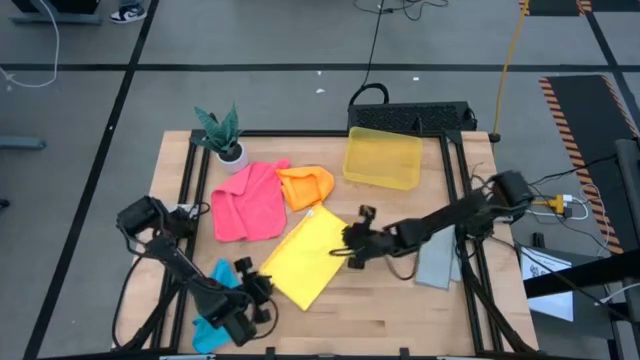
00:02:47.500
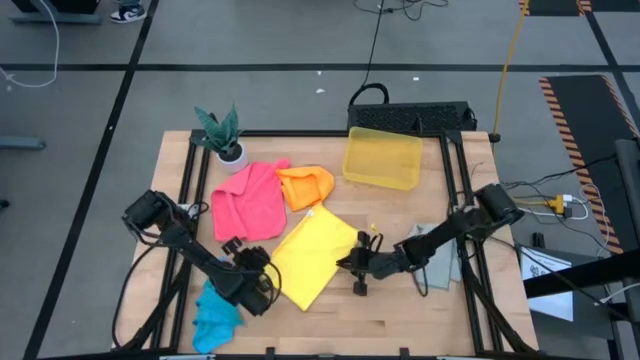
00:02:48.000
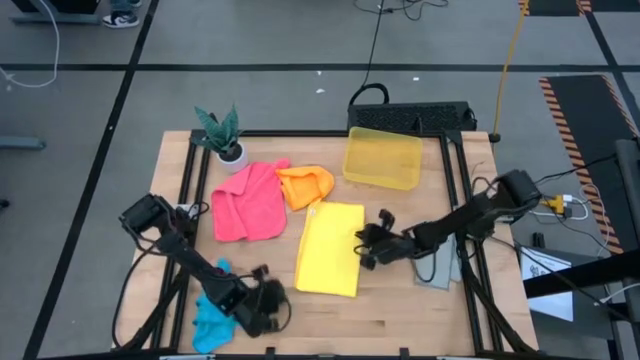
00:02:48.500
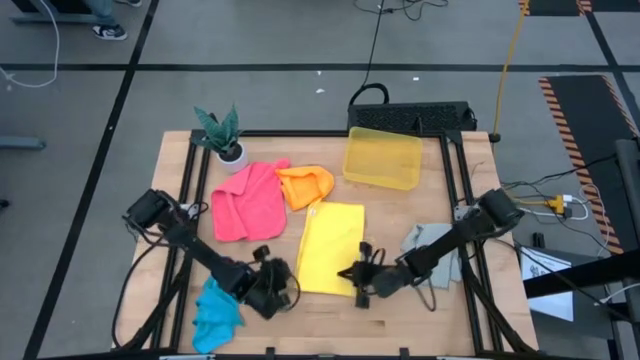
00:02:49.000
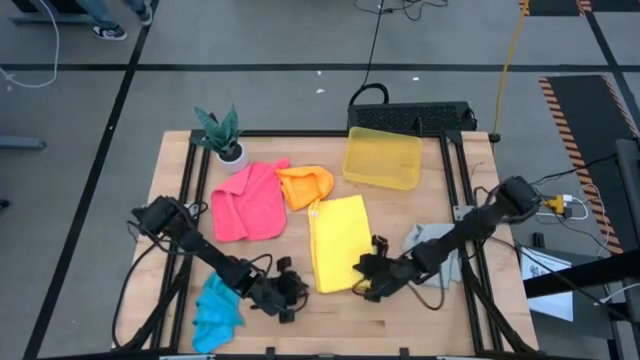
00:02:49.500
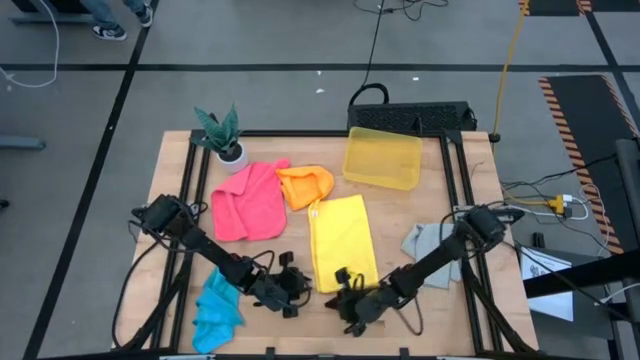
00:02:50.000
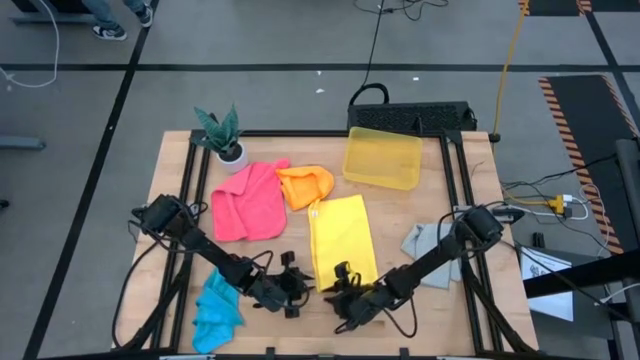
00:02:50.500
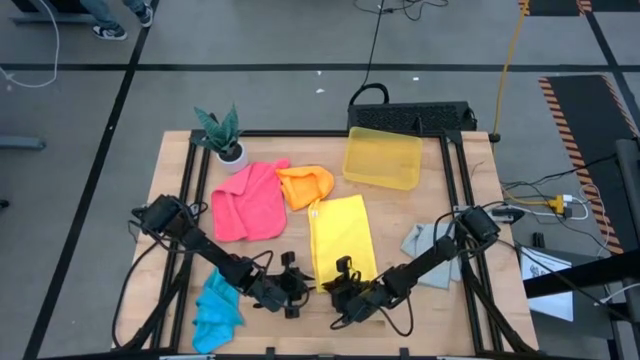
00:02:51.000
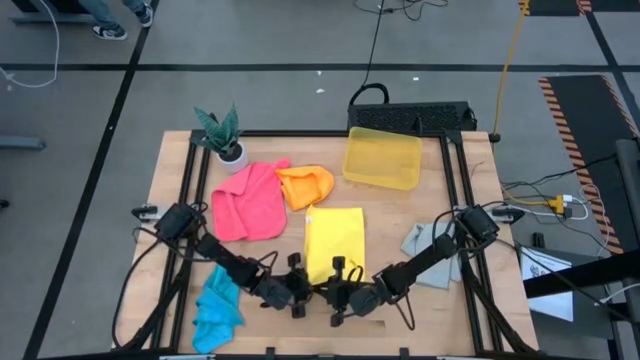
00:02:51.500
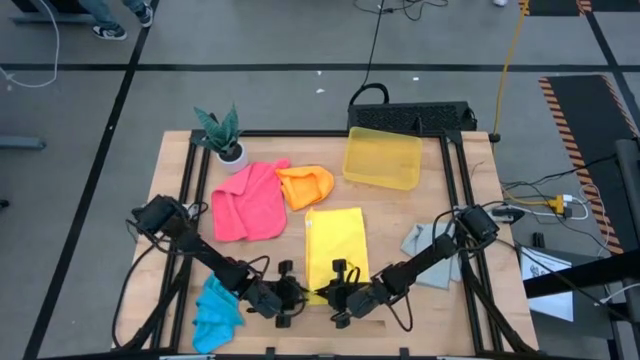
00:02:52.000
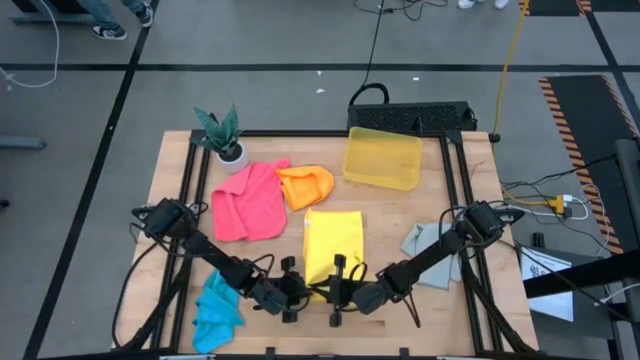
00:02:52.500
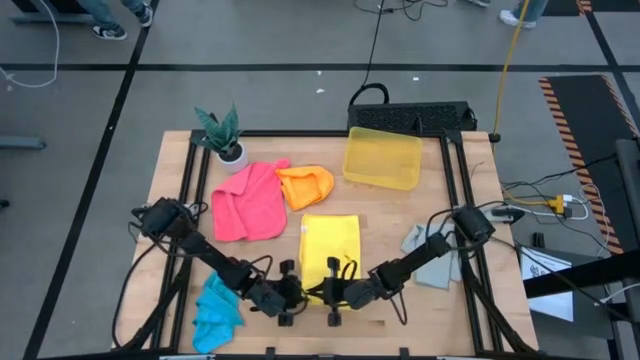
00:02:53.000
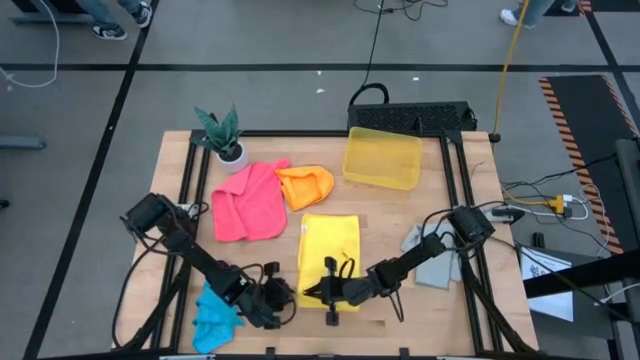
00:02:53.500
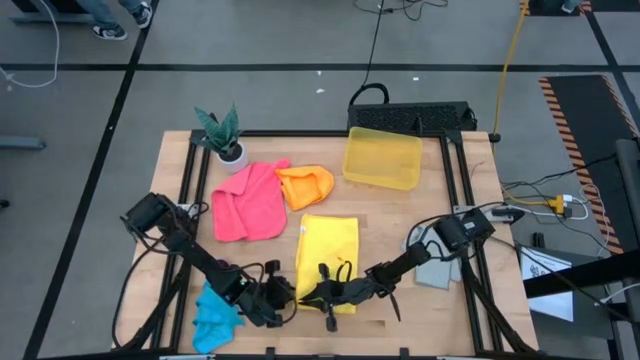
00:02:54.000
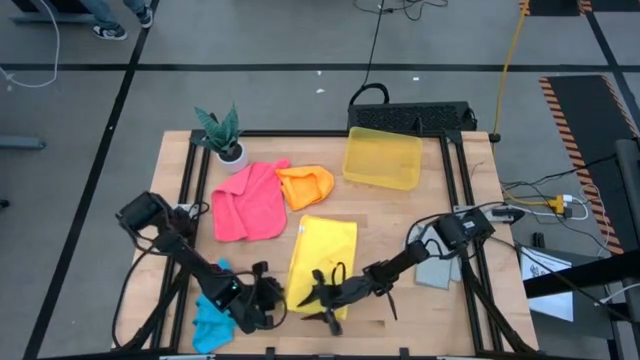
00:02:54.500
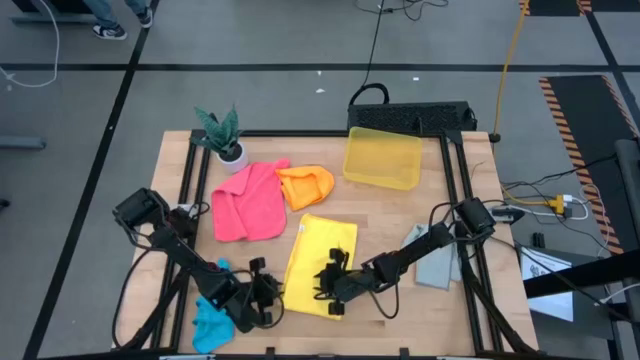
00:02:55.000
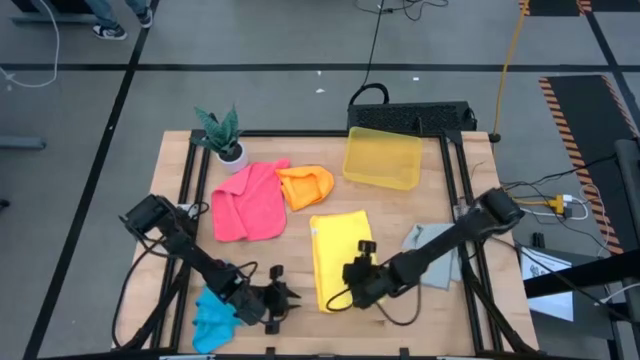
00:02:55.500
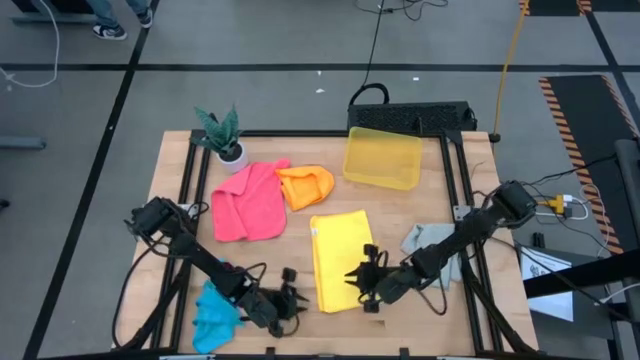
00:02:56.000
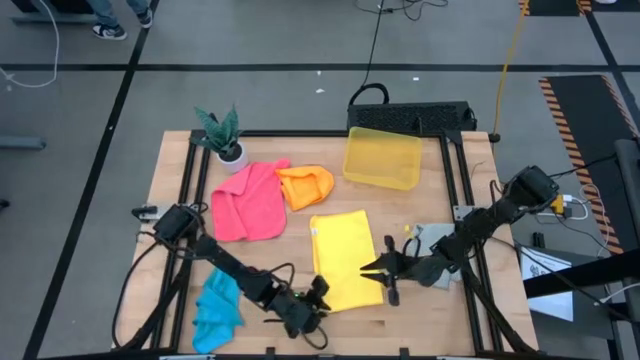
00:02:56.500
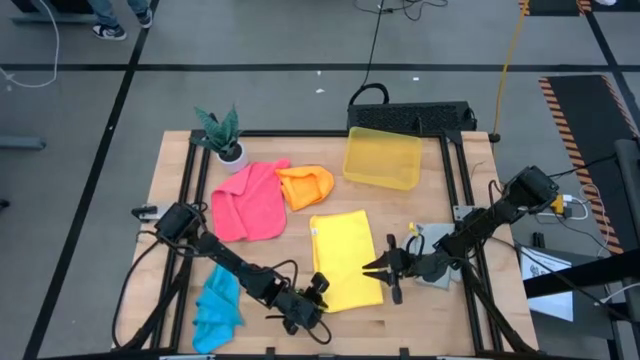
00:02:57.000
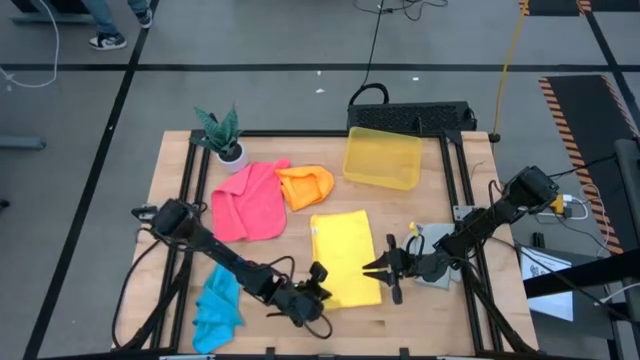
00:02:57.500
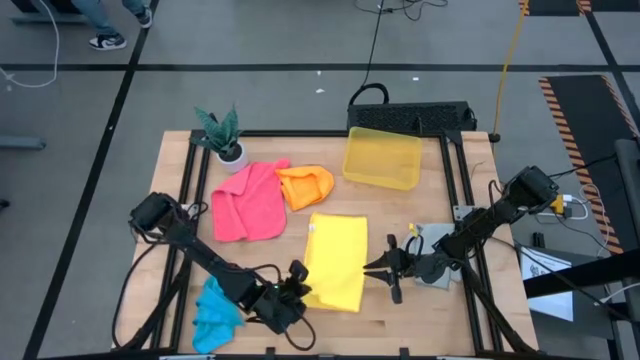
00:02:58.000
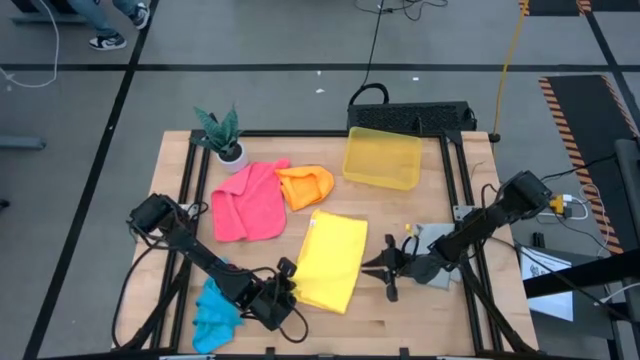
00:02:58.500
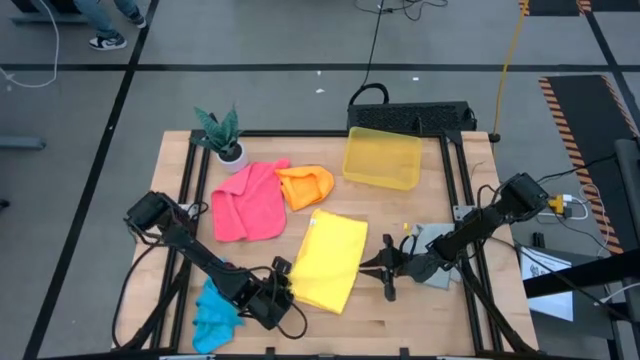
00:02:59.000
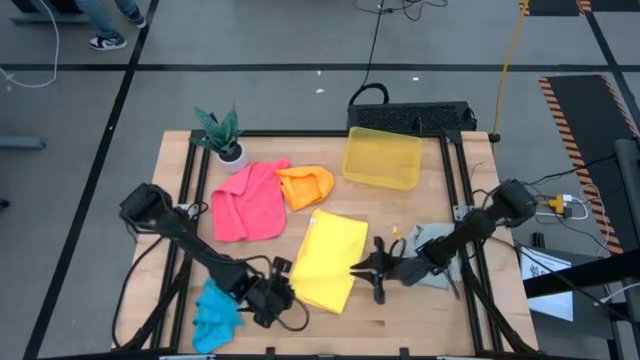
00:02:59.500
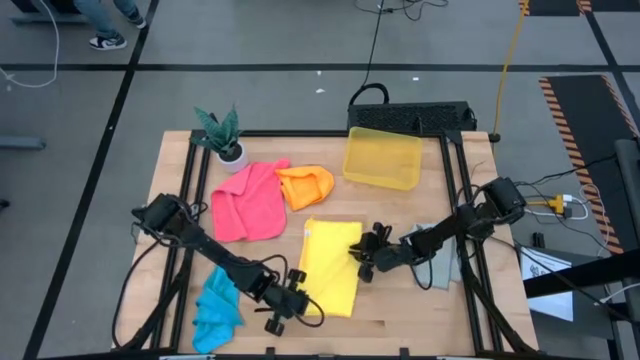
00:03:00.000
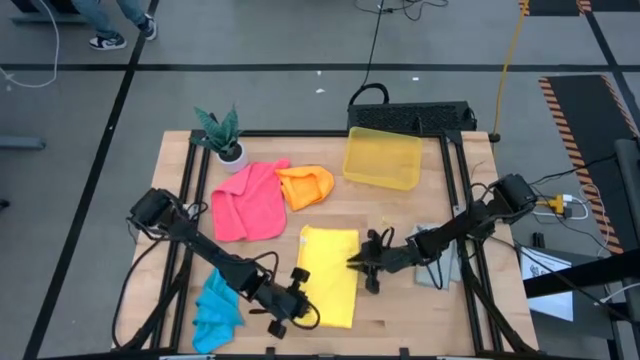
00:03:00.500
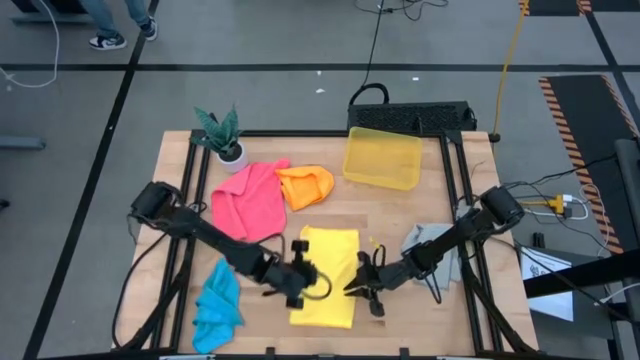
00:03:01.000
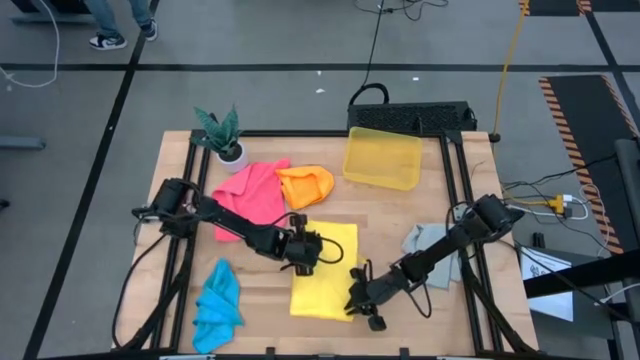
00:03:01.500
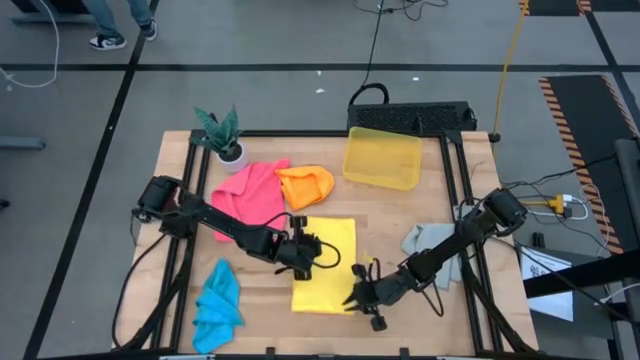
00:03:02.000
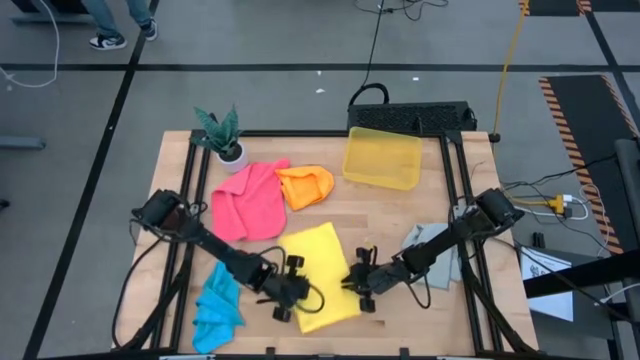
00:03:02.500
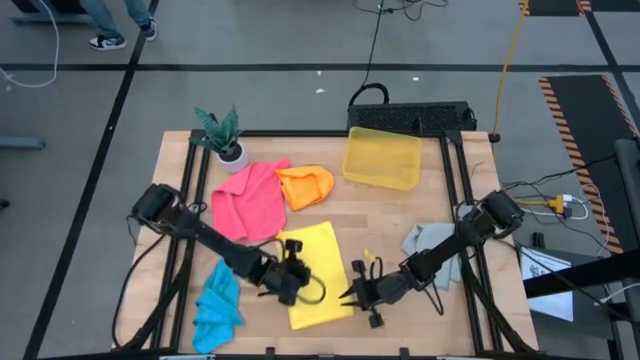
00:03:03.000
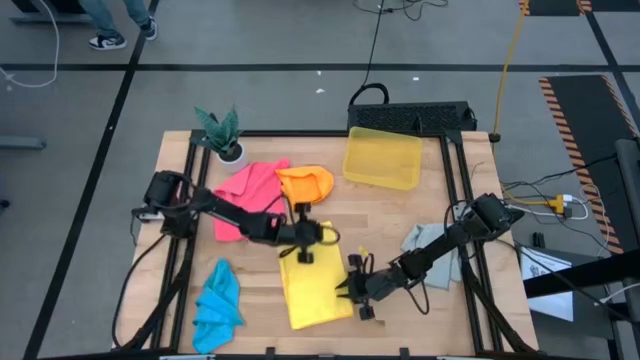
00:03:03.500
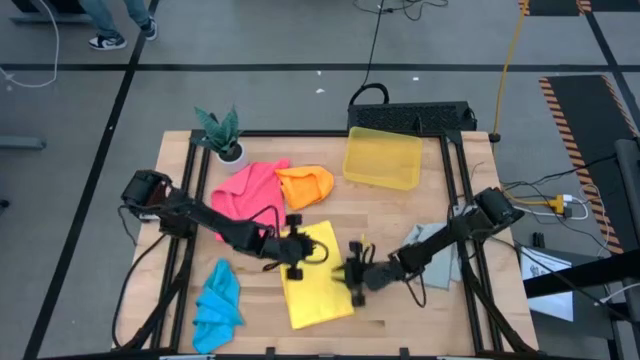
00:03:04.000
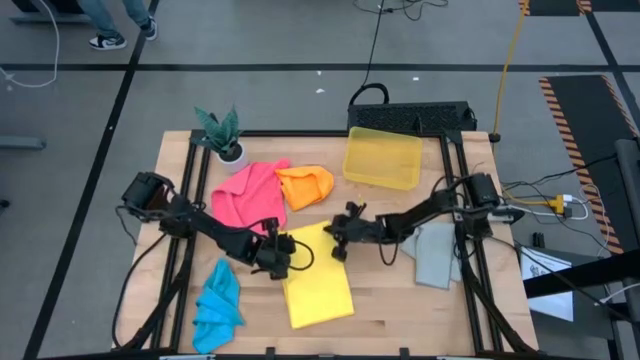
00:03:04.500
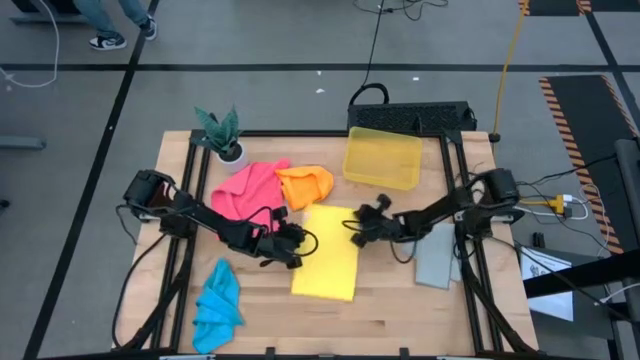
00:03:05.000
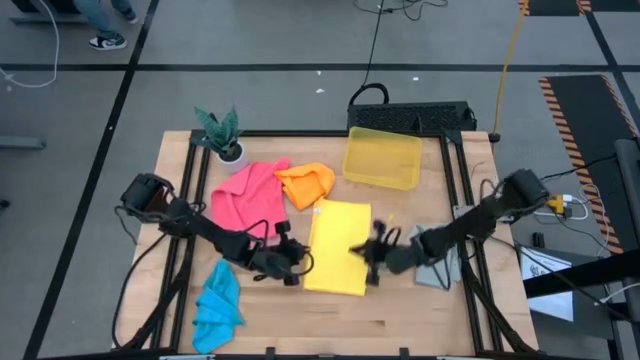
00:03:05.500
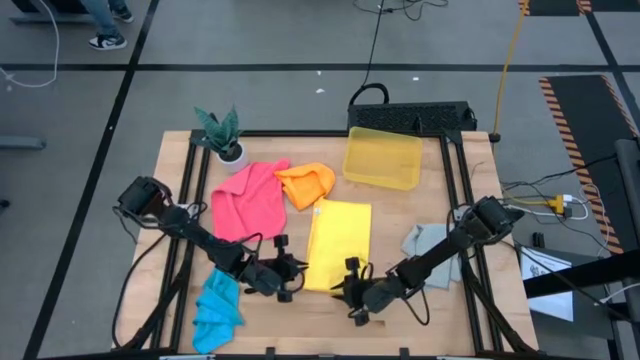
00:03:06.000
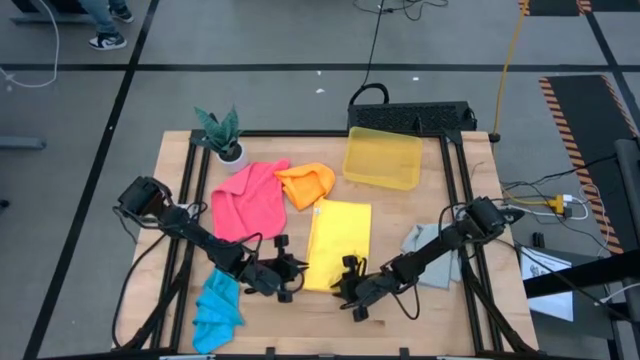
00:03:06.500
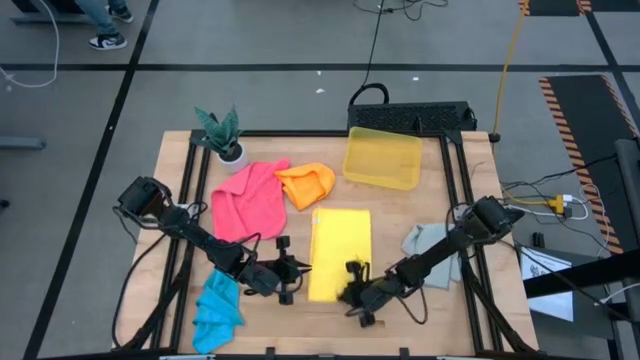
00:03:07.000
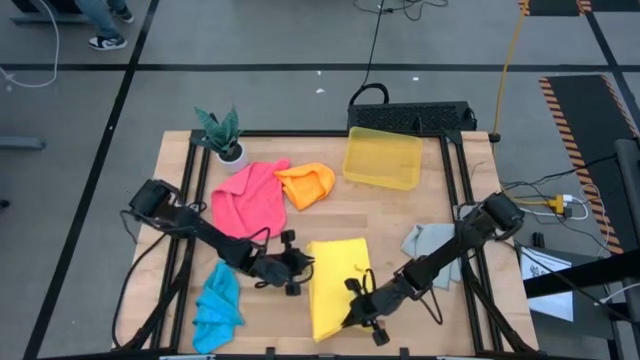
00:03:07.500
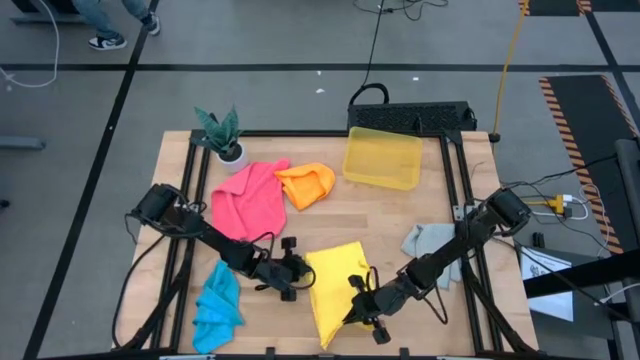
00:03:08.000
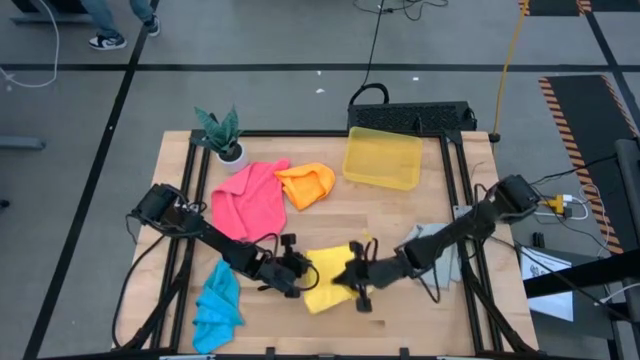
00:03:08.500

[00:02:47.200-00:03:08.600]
Task: Fold microfiber towels
Fold the yellow kitchen towel
